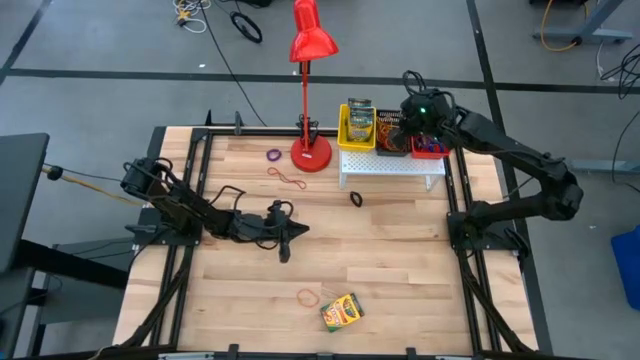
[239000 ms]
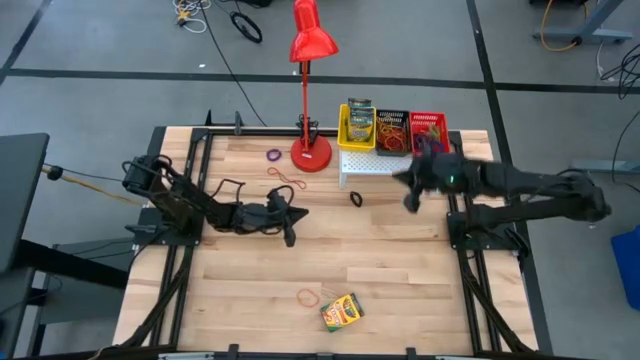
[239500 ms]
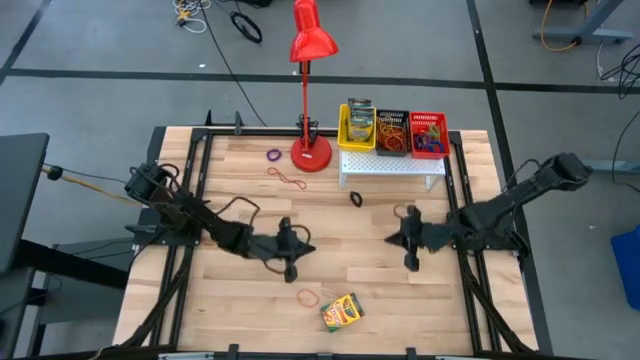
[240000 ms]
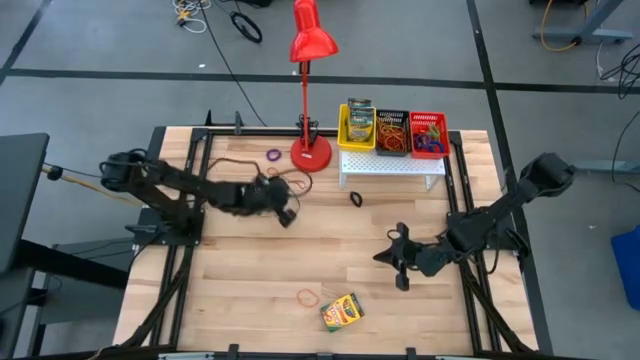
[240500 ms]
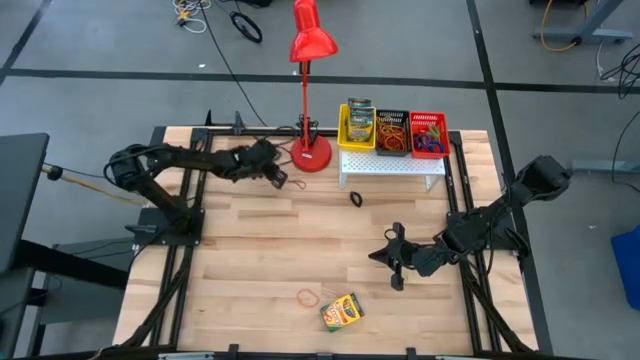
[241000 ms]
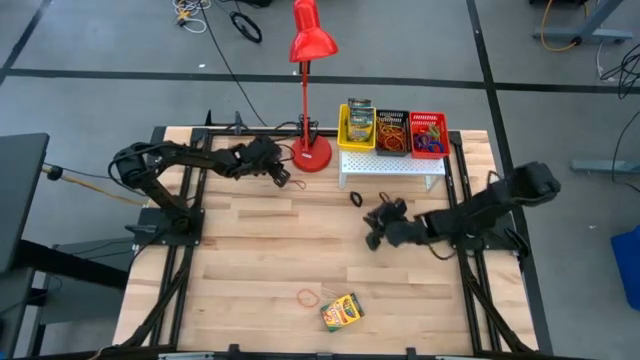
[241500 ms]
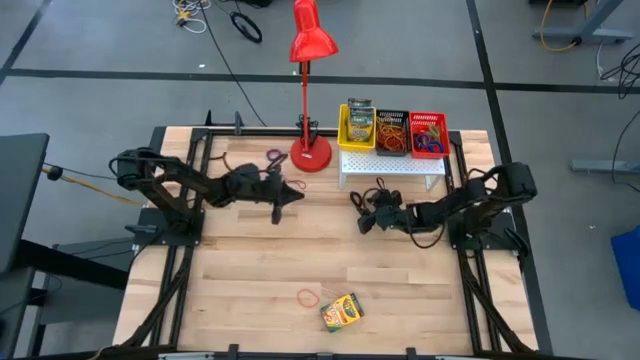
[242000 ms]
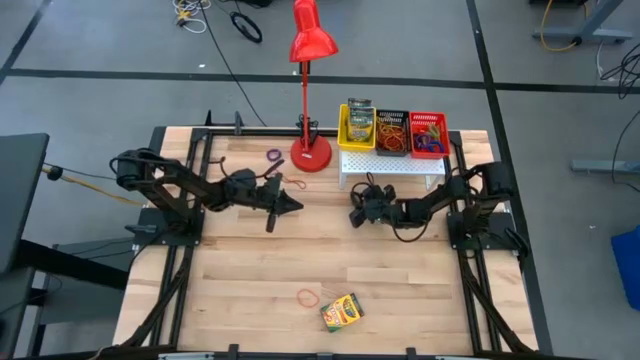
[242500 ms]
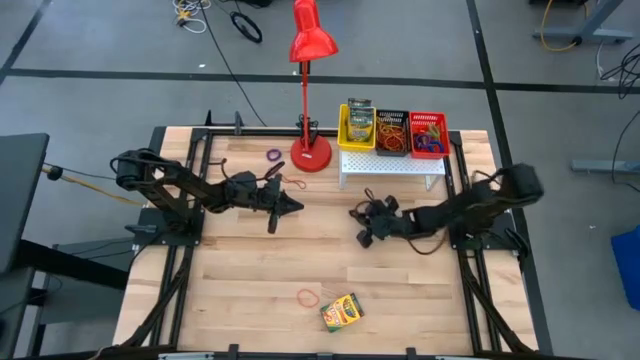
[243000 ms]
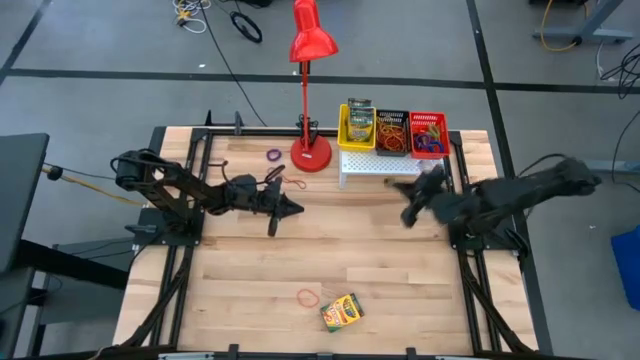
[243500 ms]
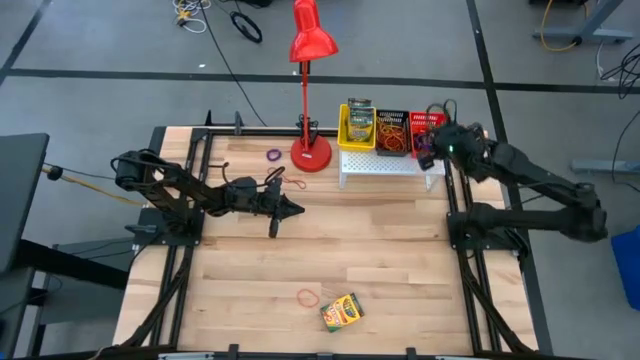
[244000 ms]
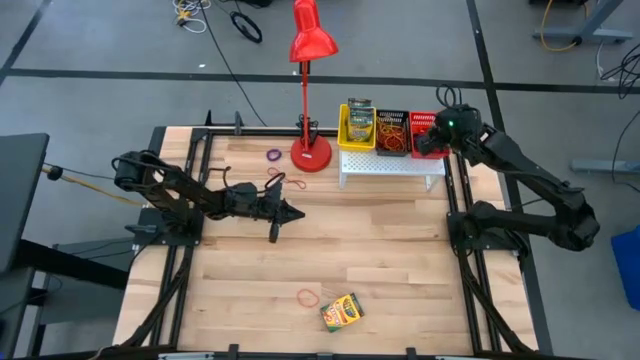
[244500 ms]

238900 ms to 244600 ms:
Task: Pick & Place Office Desk Supplies
Put the black spring keychain into the red bin on the shelf

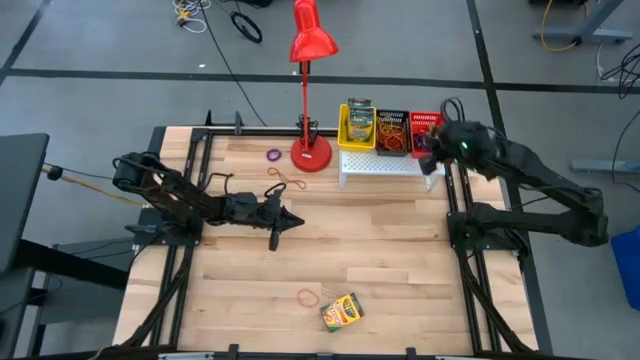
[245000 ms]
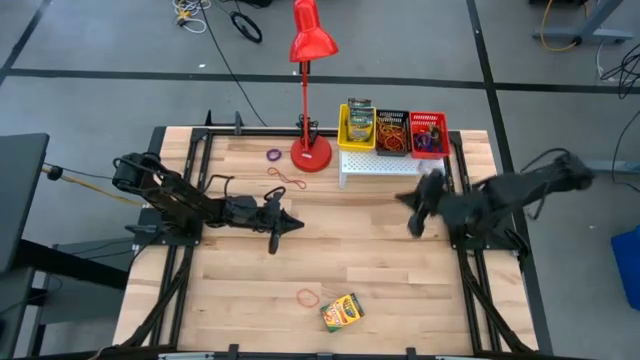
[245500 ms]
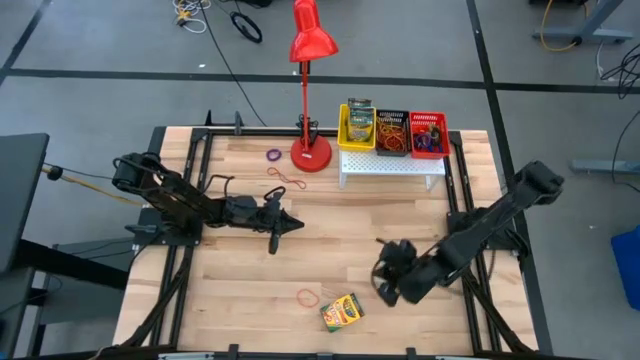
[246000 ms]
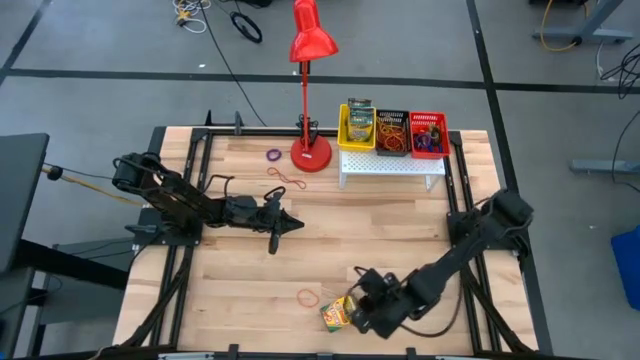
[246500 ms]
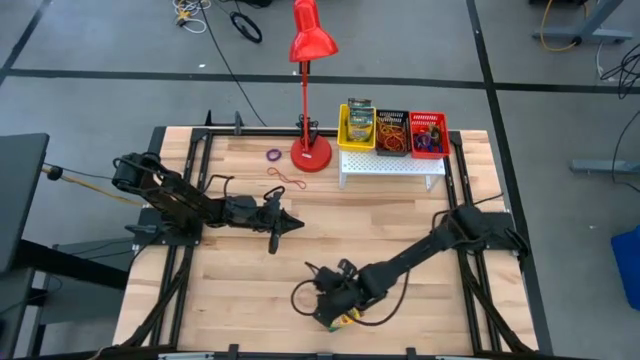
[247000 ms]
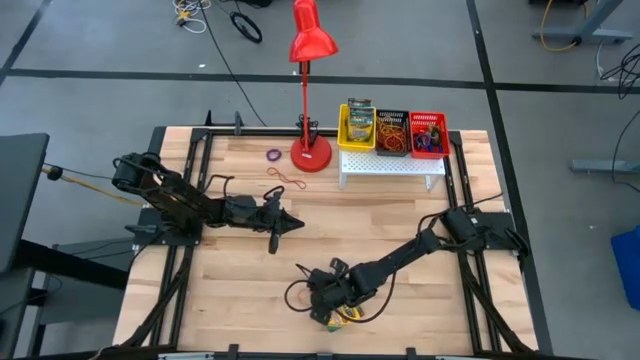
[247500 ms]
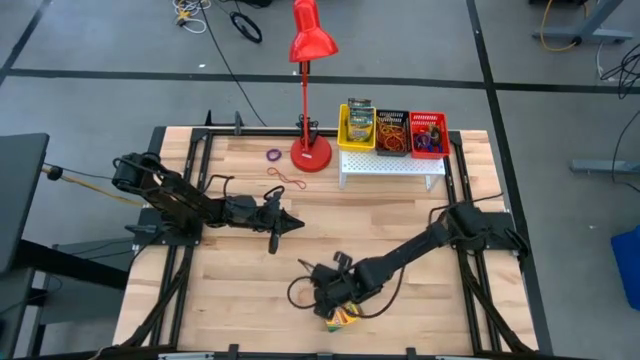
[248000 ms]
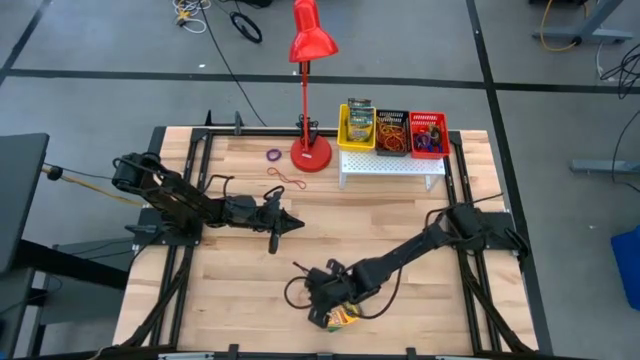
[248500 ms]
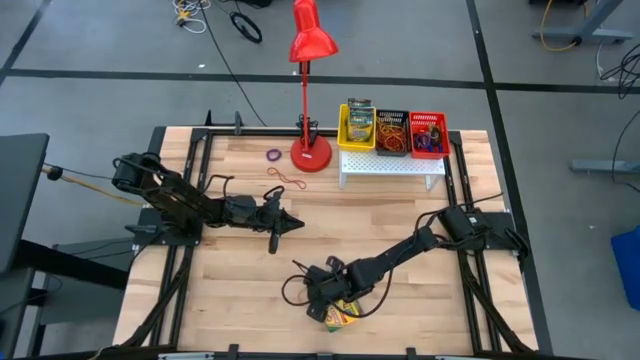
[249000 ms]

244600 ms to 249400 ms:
Put the orange rubber band into the black bin on the shelf

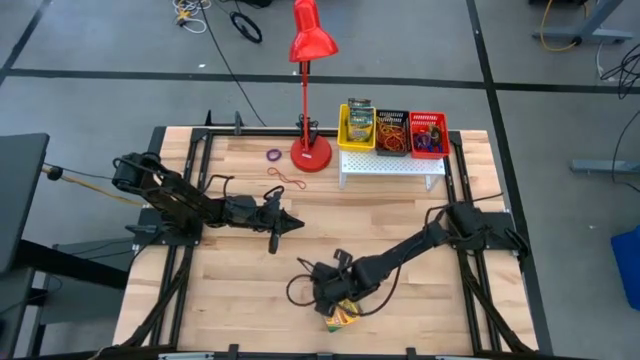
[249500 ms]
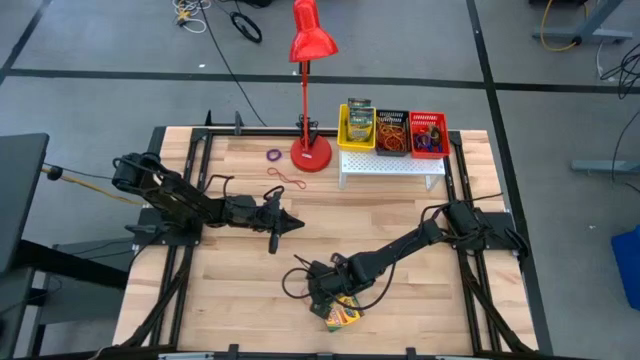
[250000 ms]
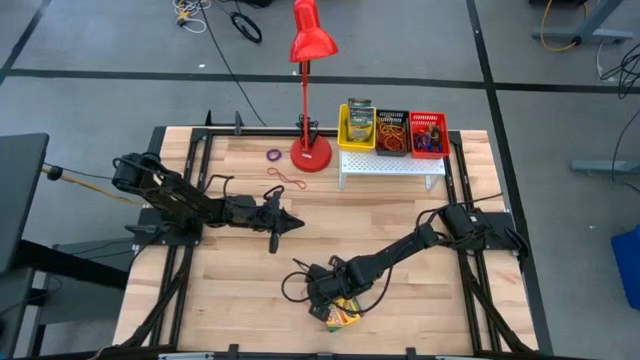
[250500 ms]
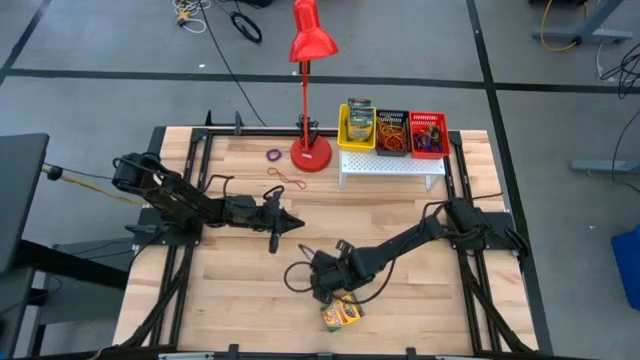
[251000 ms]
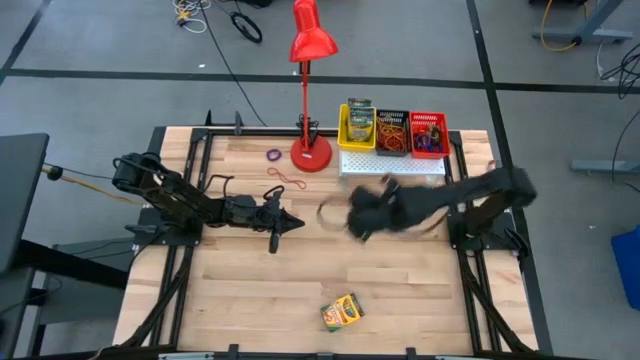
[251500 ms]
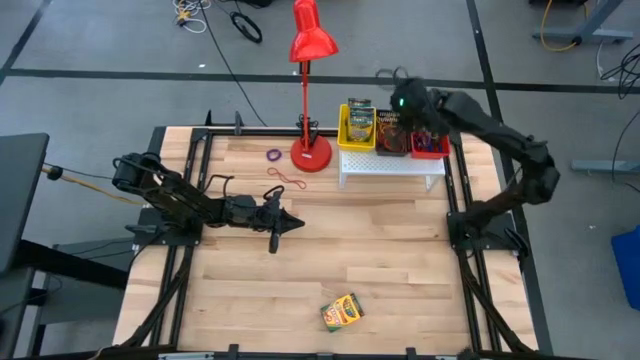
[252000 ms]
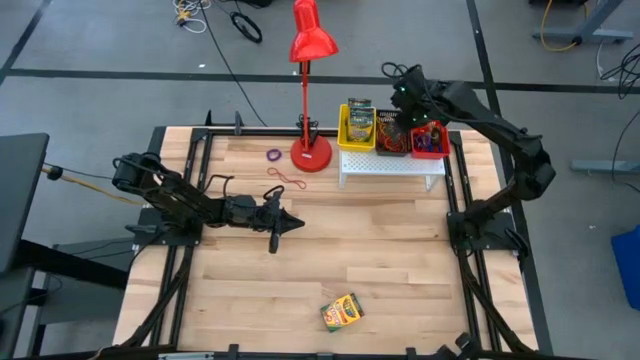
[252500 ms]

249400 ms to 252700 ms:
Put the orange rubber band into the black bin on the shelf

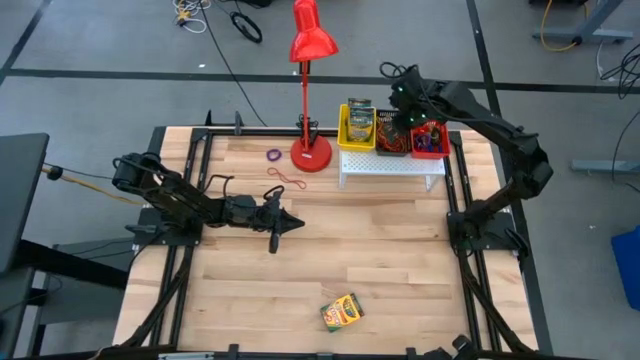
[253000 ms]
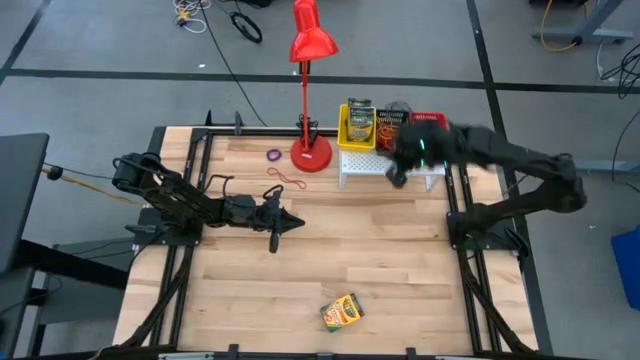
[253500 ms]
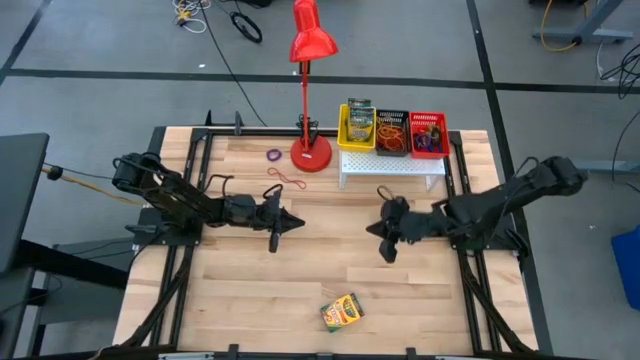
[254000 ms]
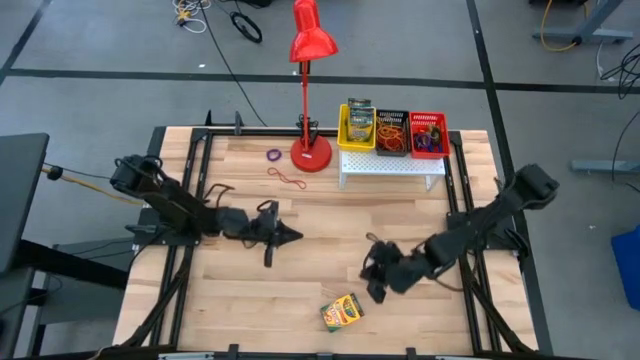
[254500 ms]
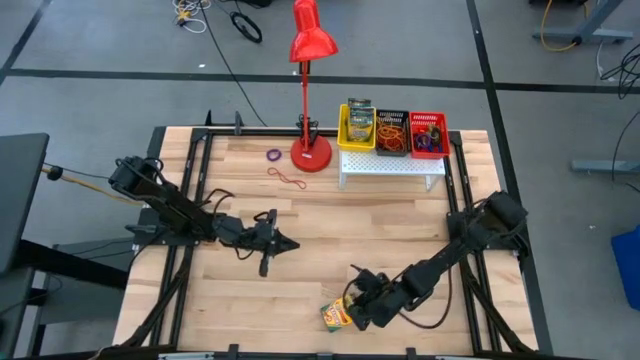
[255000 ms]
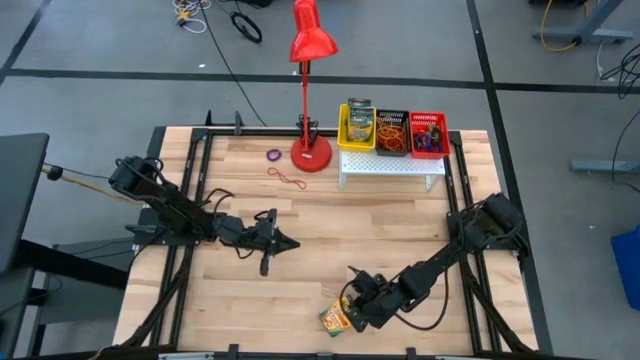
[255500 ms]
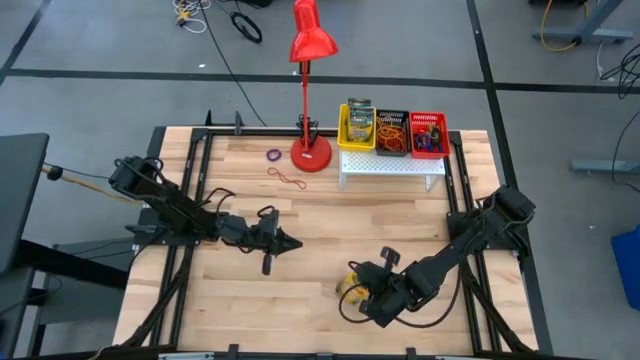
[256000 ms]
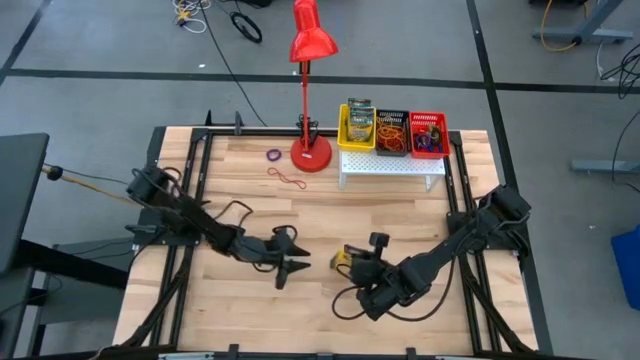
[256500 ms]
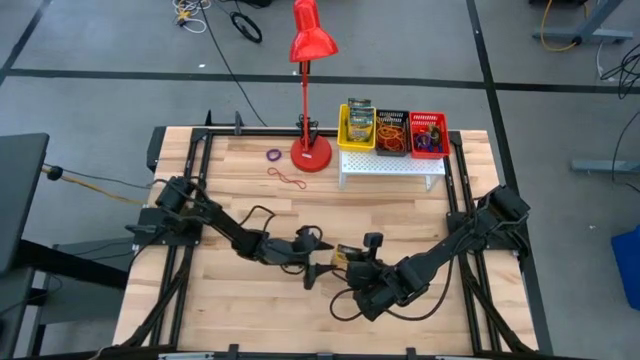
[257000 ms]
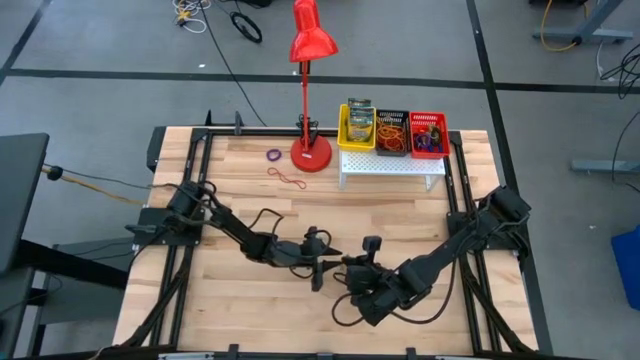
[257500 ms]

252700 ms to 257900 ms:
Put the crayon box into the yellow bin on the shelf

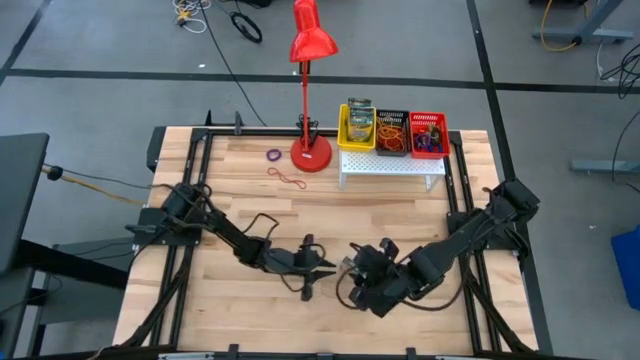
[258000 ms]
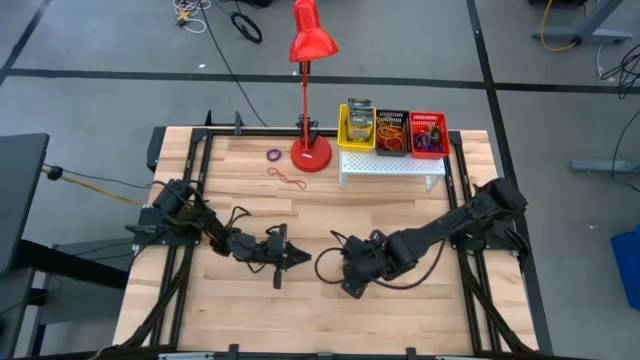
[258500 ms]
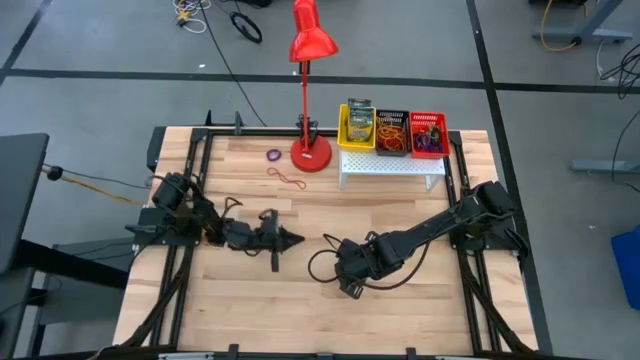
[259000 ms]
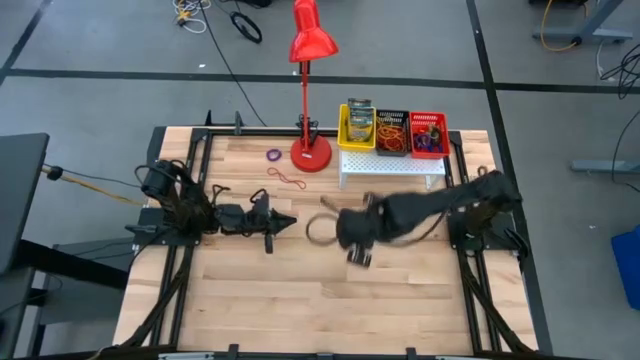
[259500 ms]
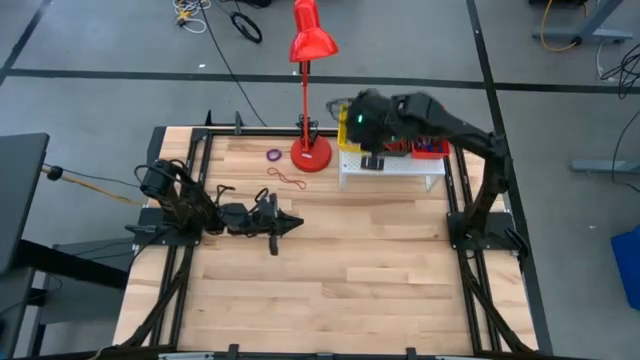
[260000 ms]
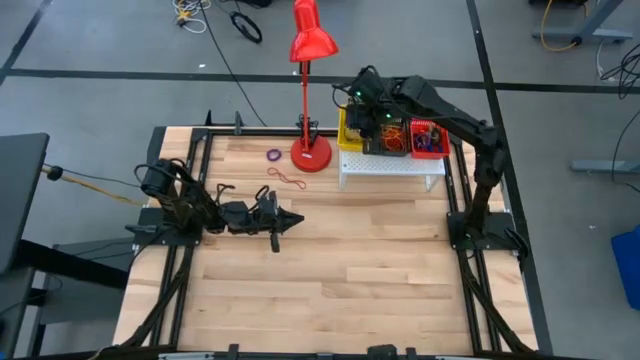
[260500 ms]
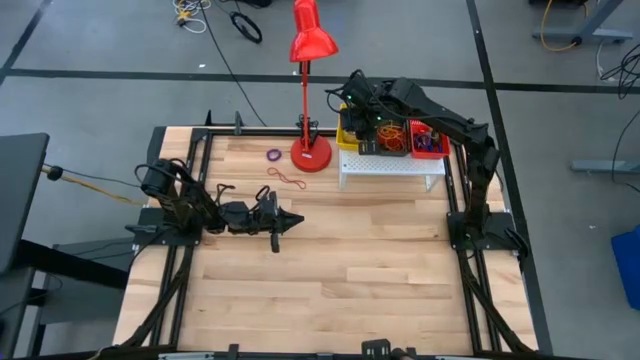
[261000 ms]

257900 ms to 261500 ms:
Put the crayon box into the yellow bin on the shelf
